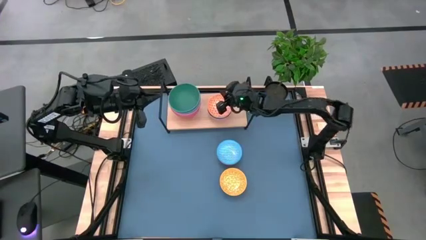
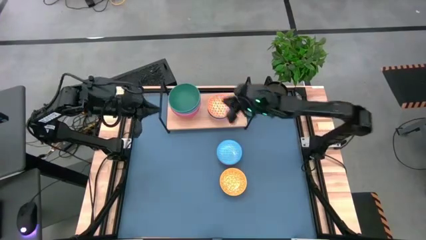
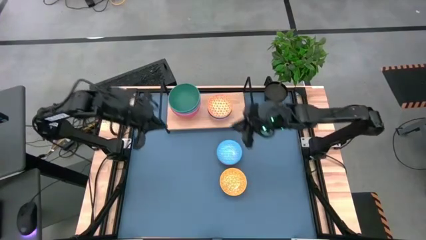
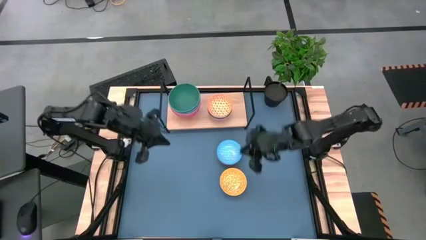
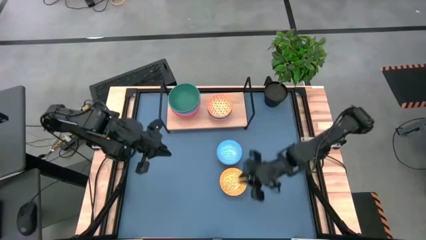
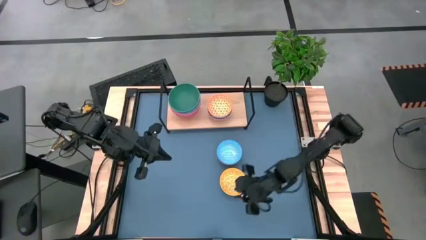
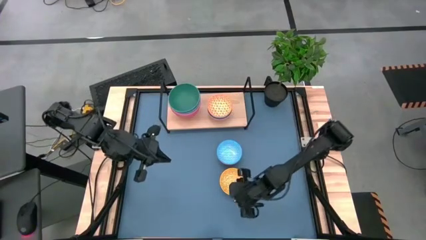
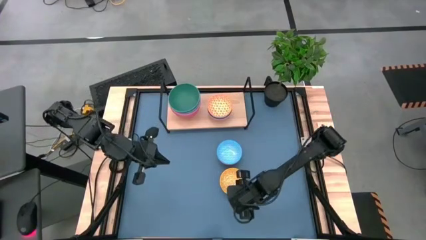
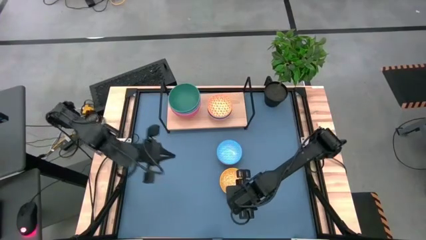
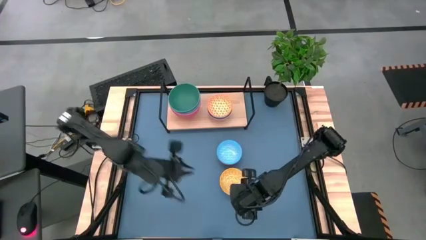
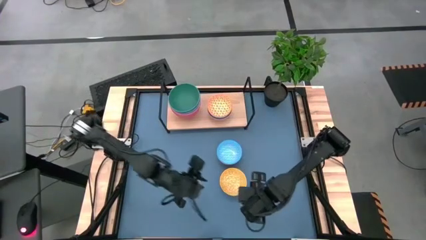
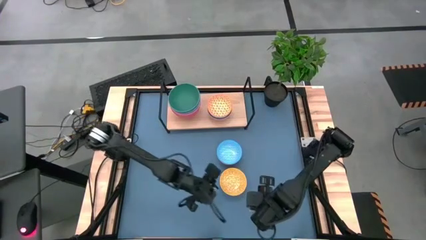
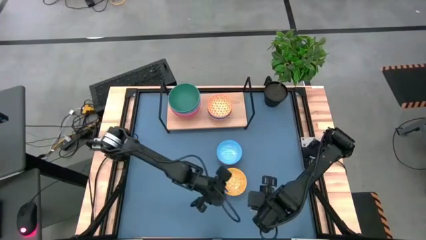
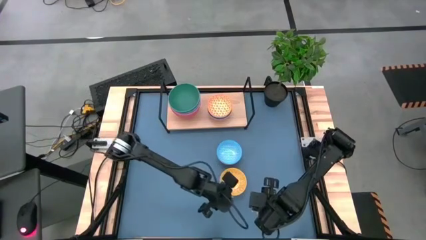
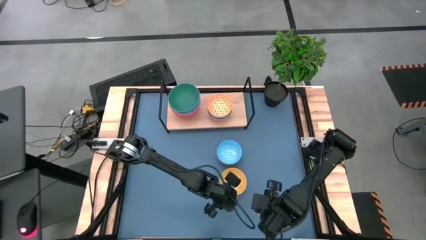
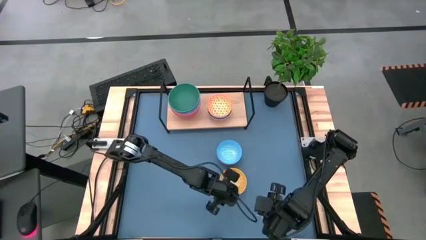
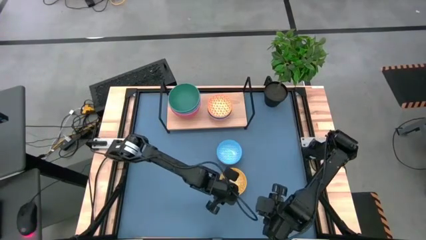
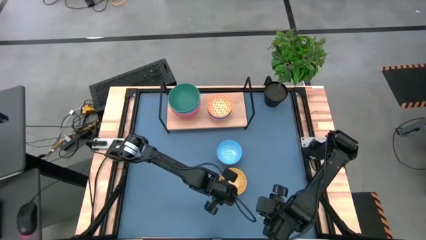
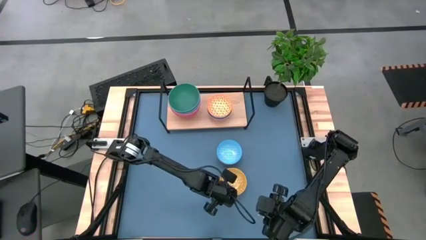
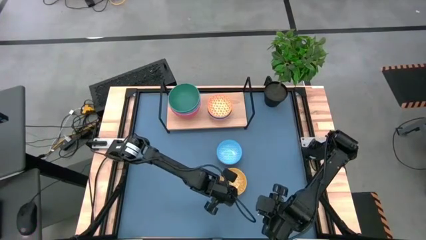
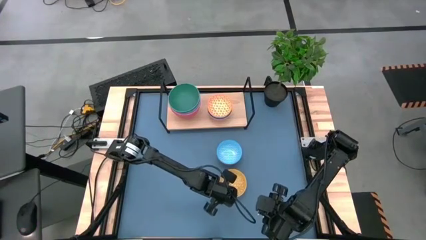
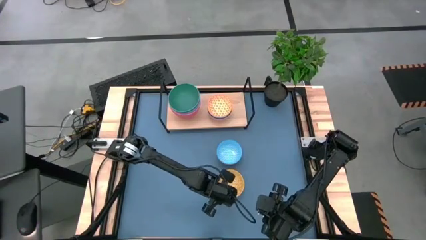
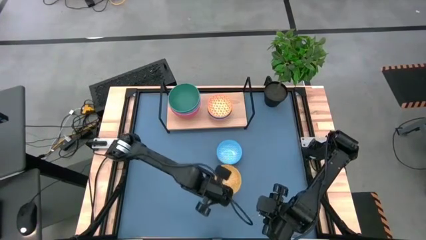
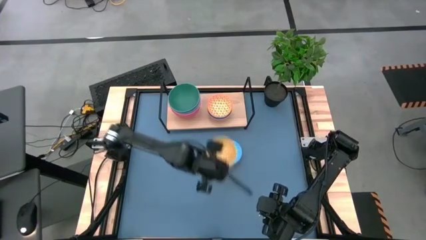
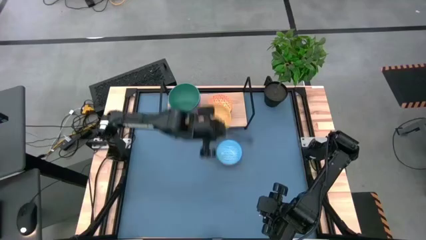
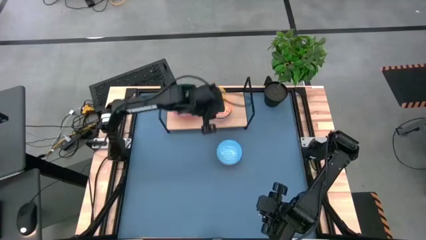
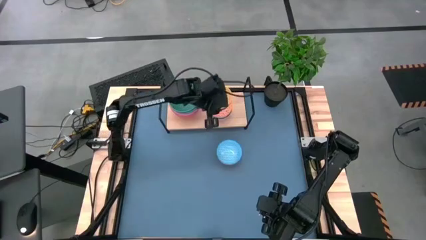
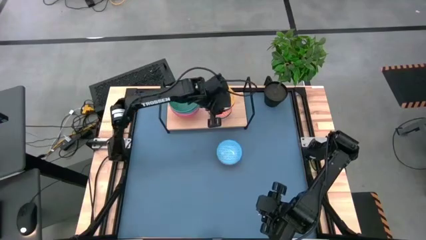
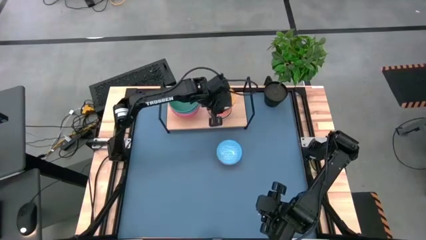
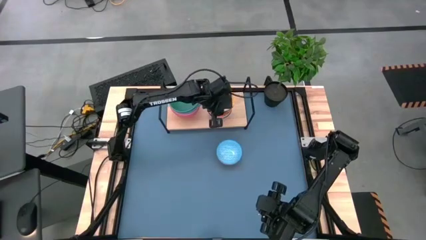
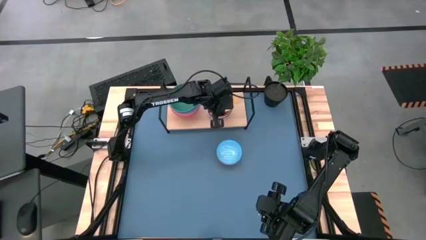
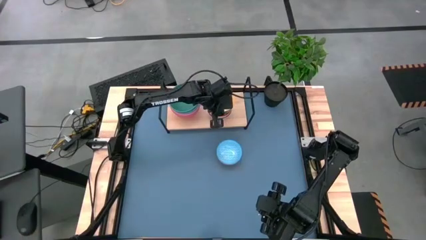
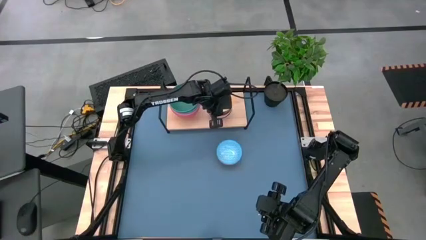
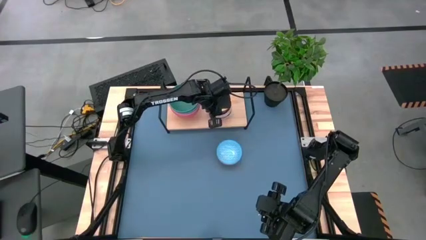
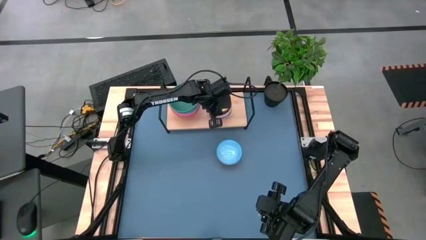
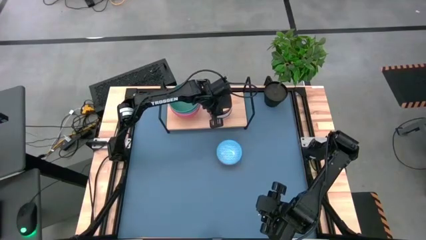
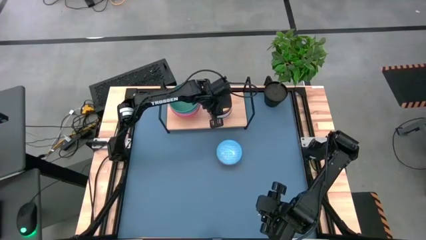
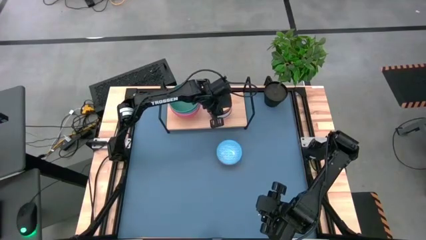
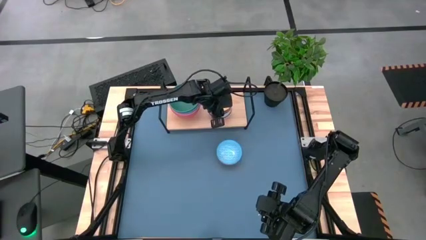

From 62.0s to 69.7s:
Task: Place and stack bowls onto a shelf
Stack the yellow patterned bowl on top of the orange patterned bowl on the shelf

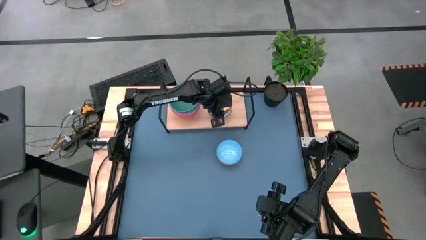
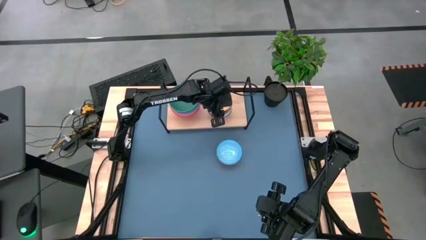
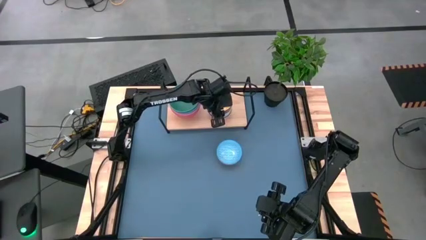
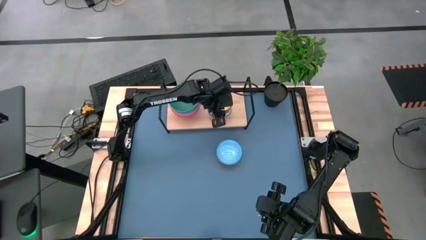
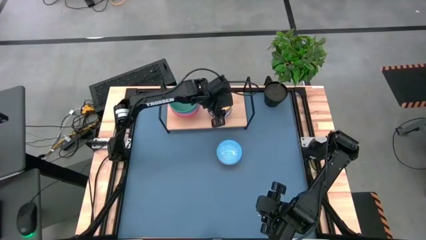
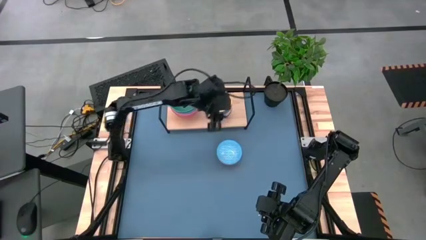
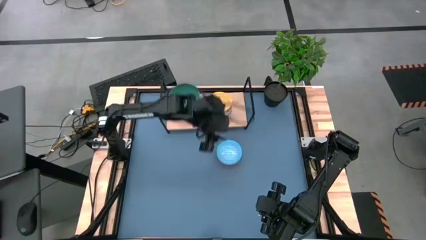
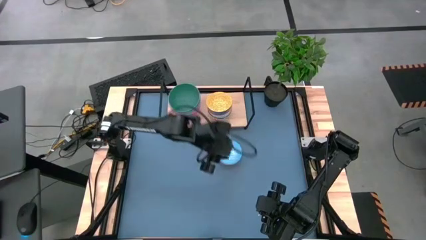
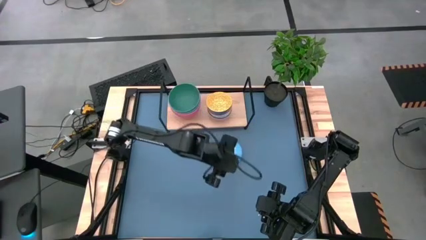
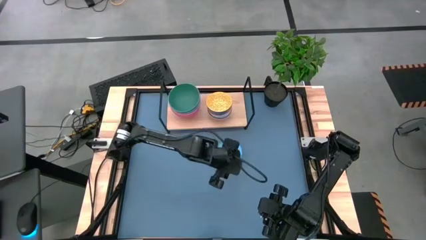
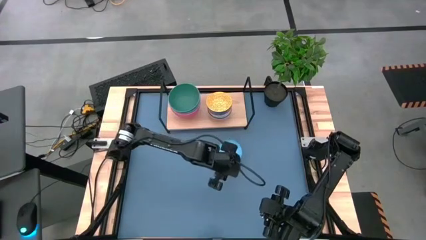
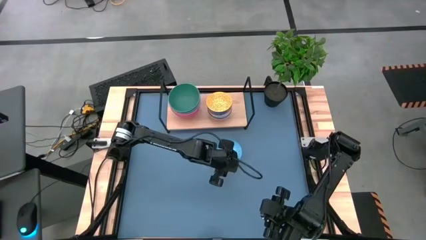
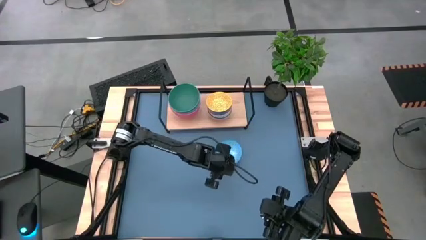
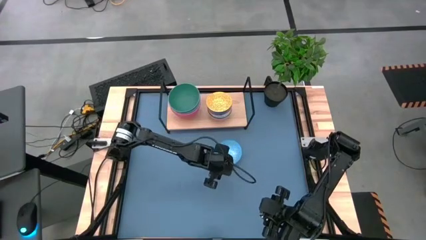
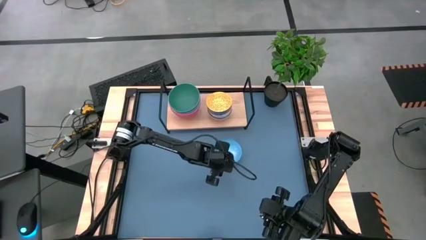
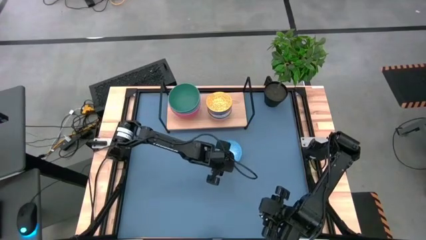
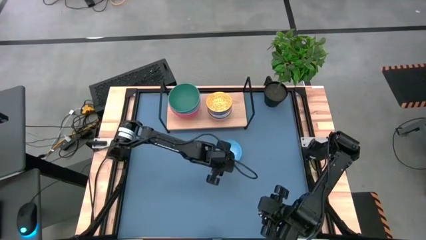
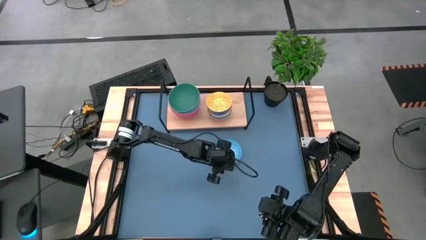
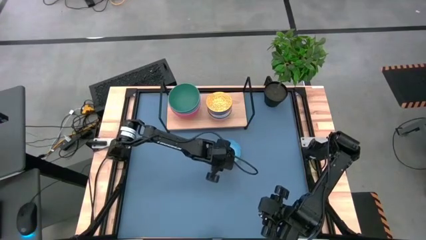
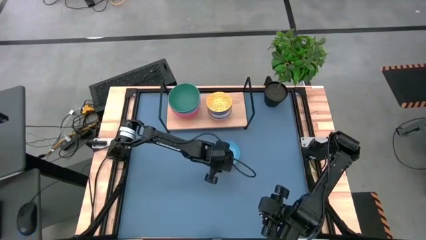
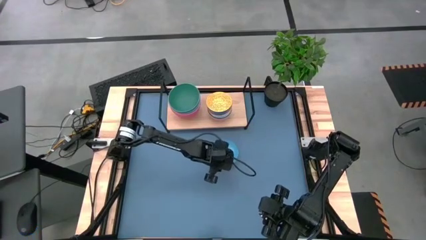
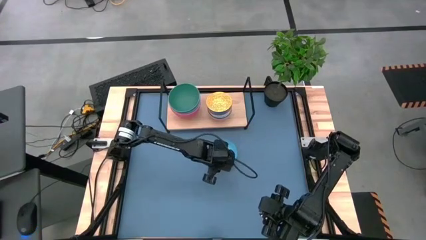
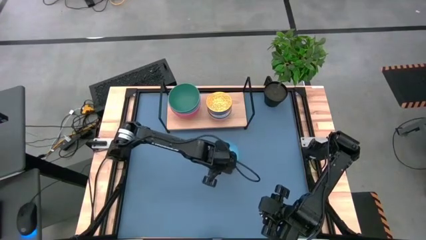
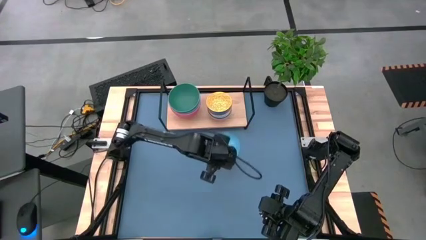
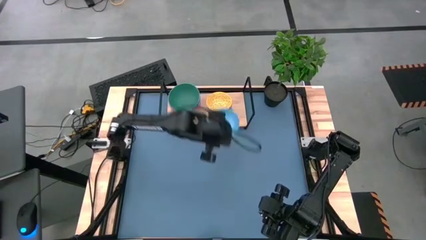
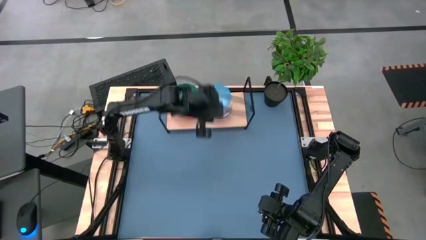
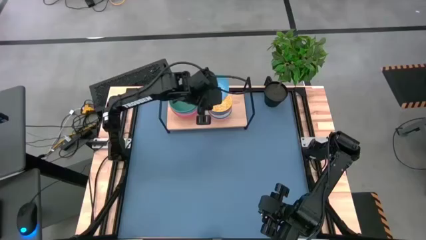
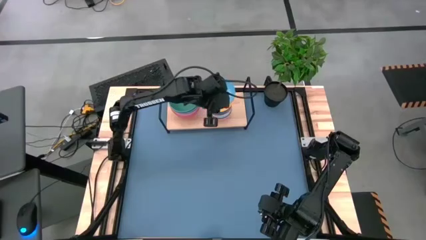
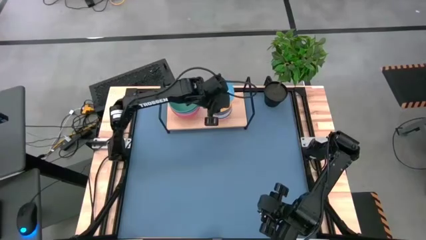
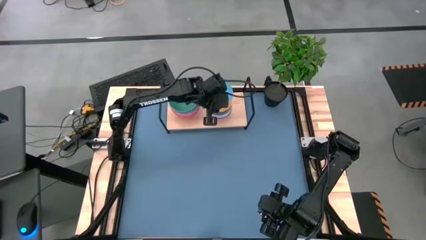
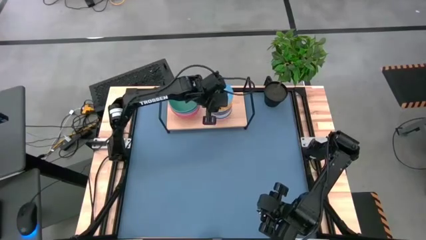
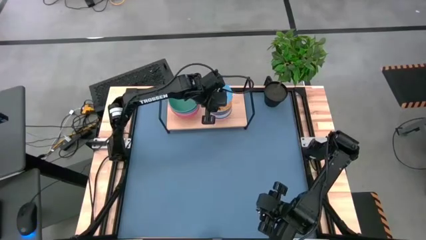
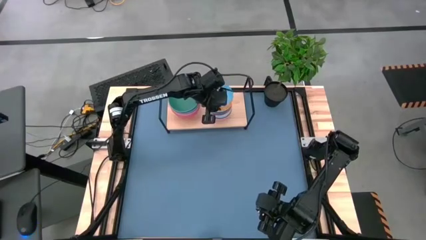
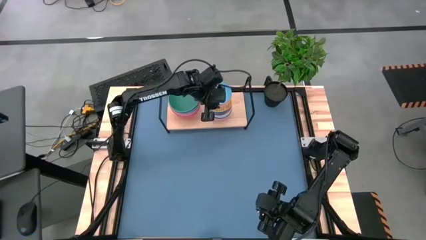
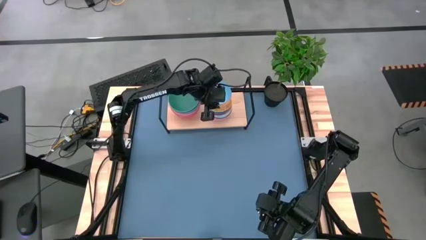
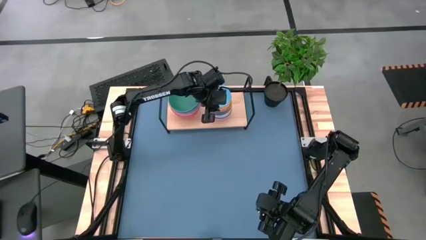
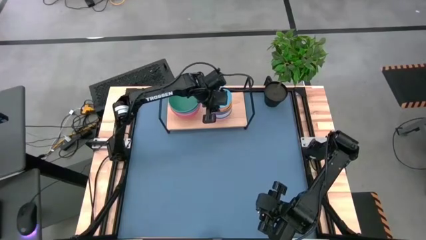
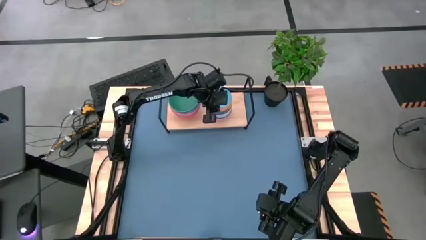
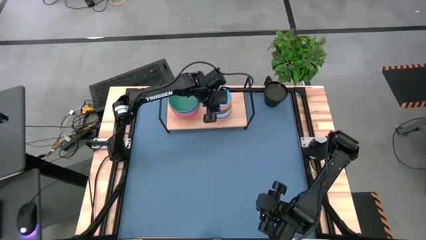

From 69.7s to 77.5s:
Stack the blue patterned bowl on top of the yellow patterned bowl on the shelf
